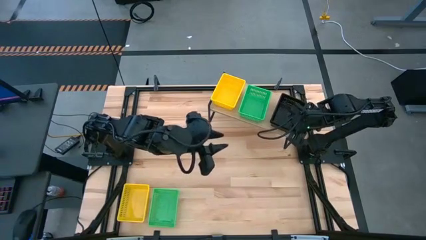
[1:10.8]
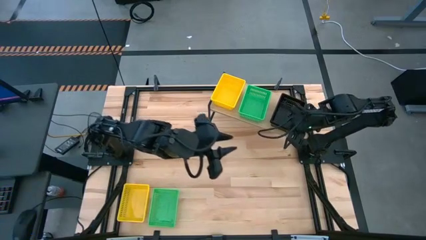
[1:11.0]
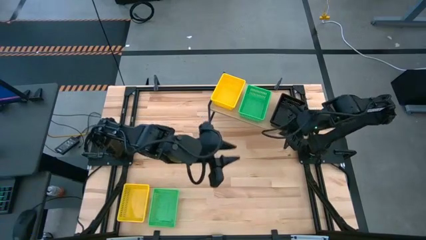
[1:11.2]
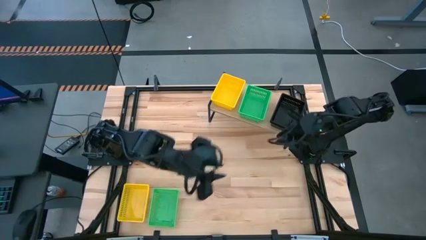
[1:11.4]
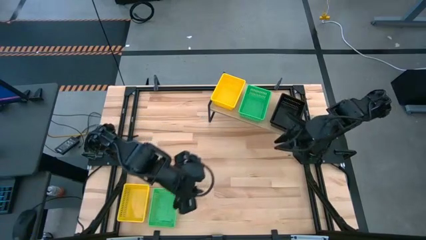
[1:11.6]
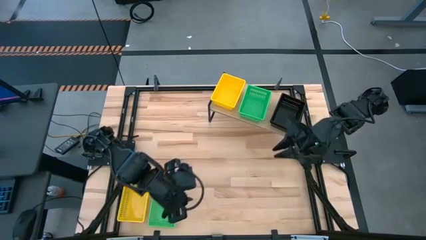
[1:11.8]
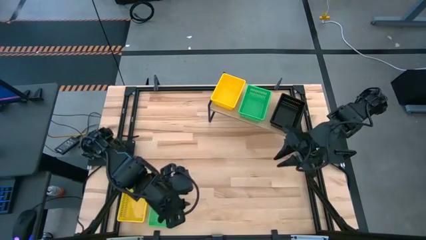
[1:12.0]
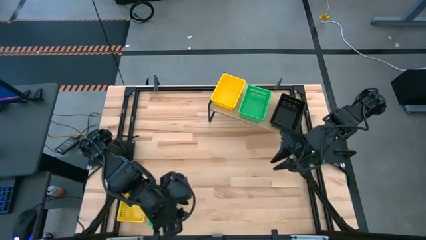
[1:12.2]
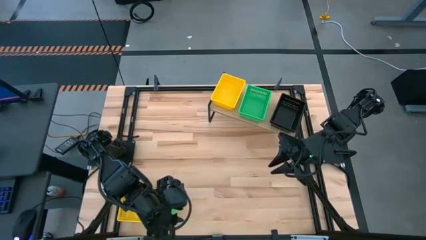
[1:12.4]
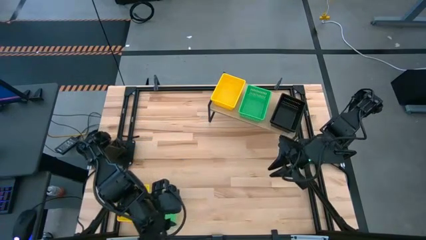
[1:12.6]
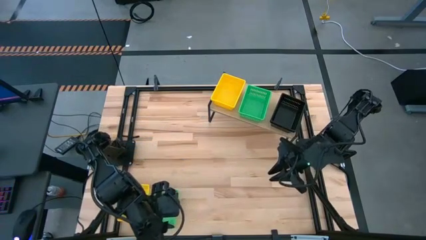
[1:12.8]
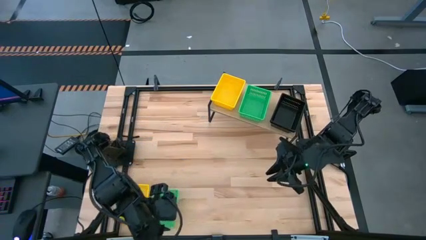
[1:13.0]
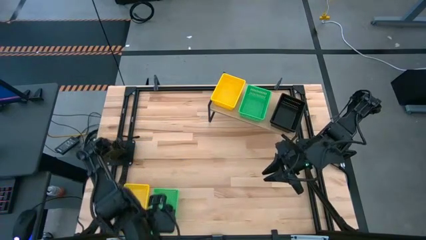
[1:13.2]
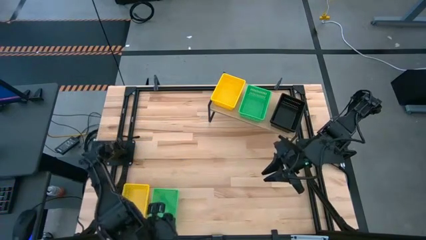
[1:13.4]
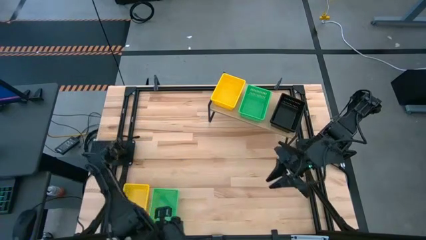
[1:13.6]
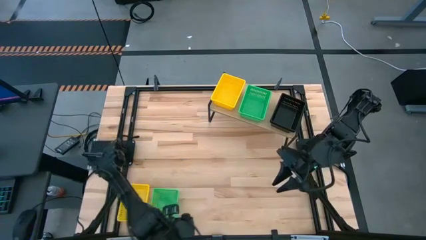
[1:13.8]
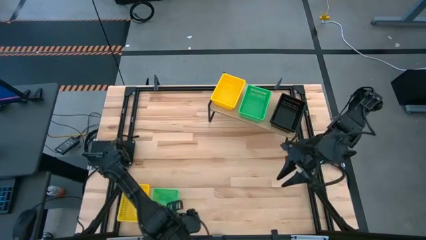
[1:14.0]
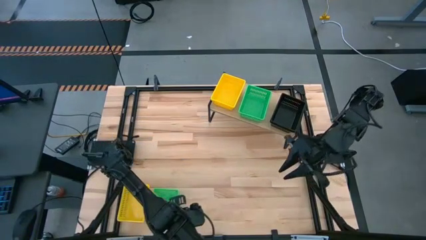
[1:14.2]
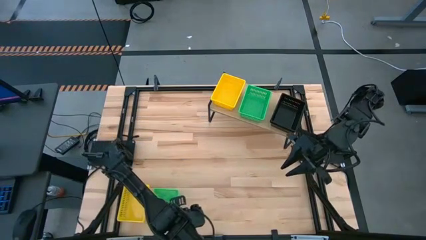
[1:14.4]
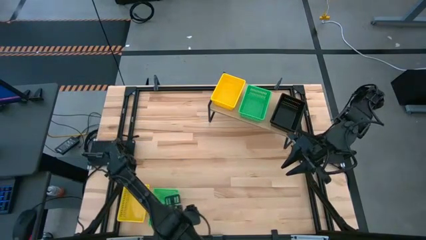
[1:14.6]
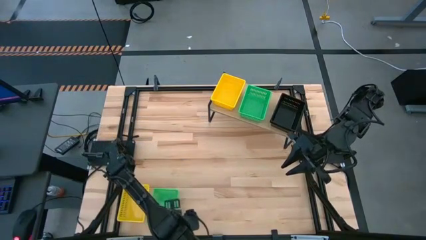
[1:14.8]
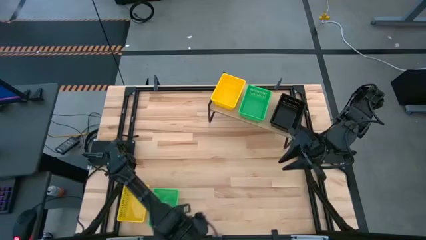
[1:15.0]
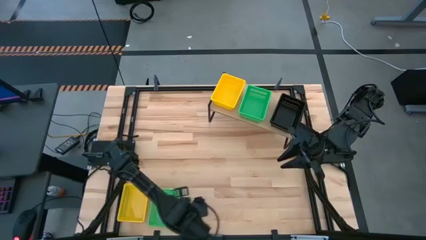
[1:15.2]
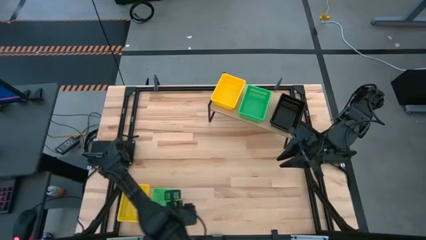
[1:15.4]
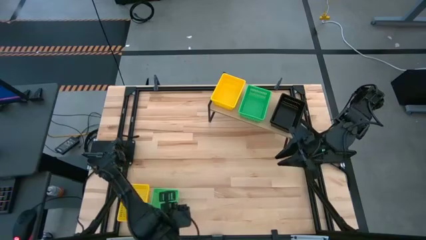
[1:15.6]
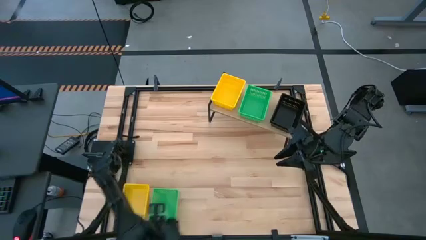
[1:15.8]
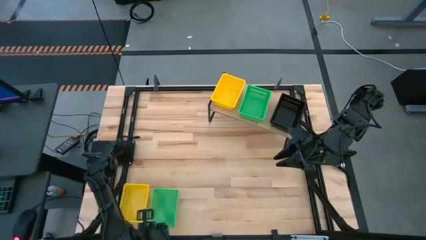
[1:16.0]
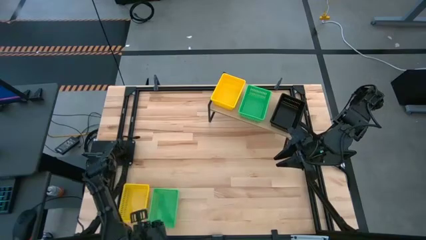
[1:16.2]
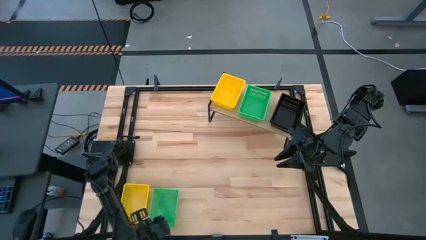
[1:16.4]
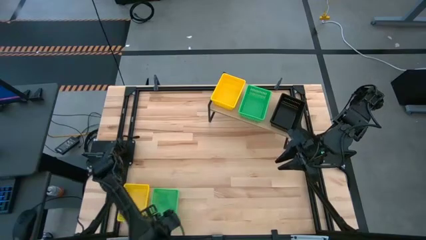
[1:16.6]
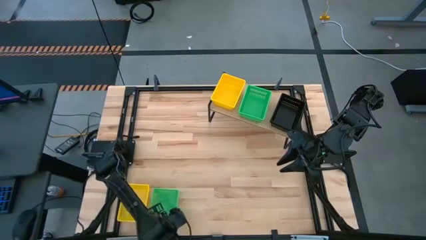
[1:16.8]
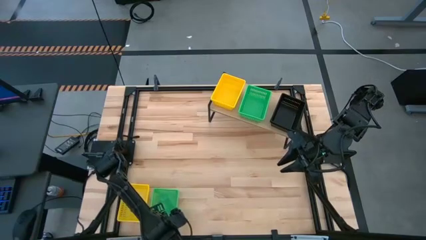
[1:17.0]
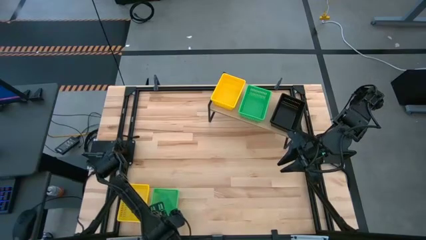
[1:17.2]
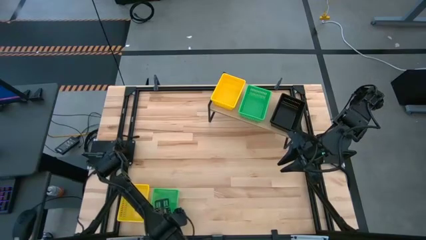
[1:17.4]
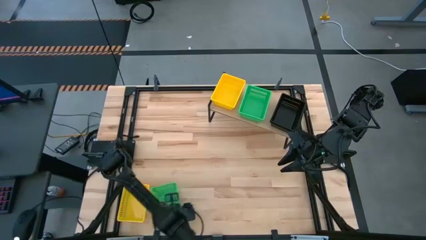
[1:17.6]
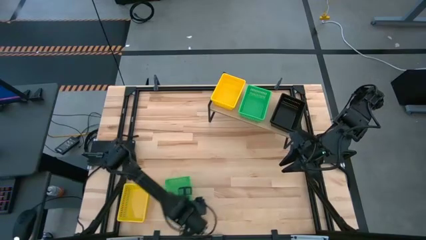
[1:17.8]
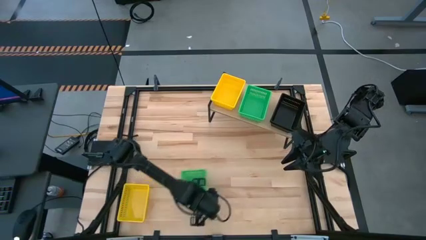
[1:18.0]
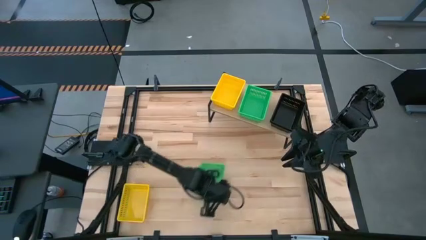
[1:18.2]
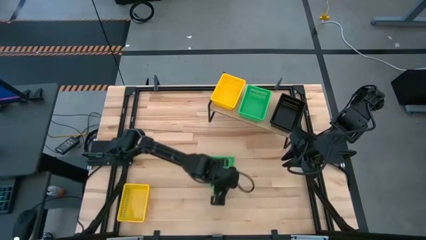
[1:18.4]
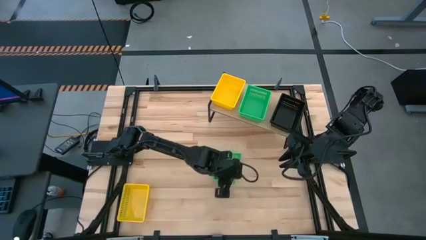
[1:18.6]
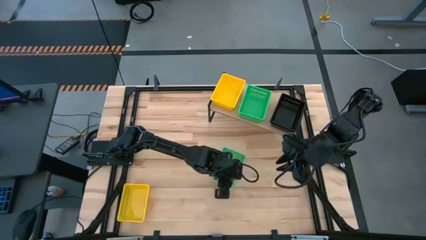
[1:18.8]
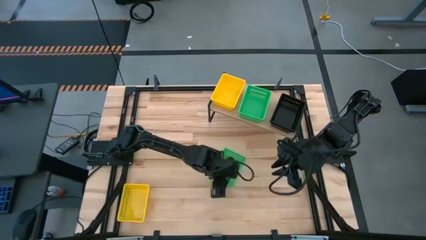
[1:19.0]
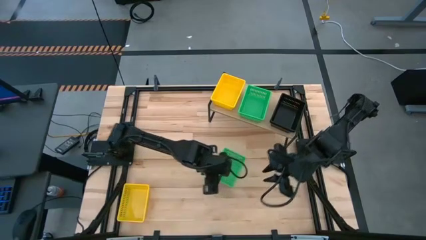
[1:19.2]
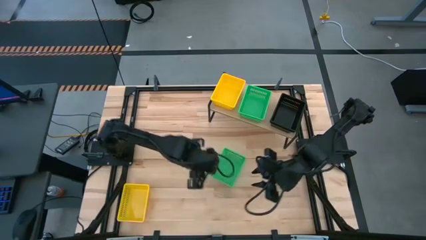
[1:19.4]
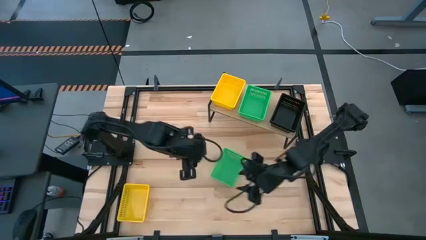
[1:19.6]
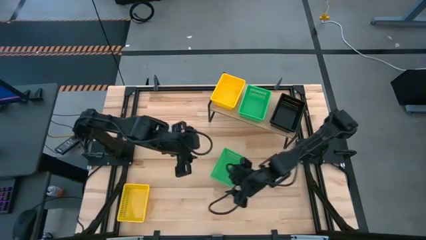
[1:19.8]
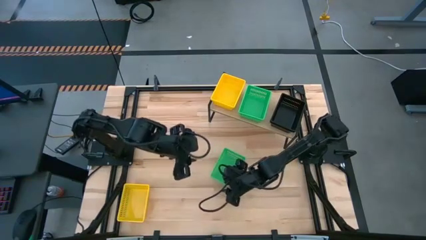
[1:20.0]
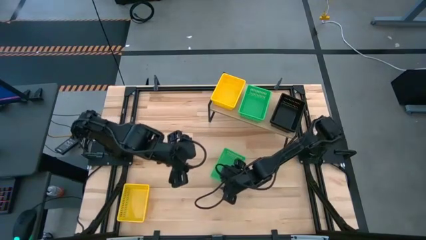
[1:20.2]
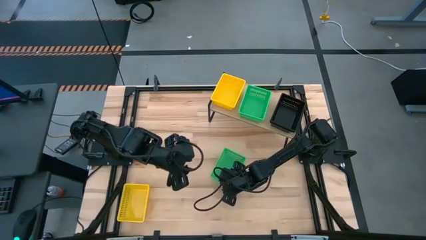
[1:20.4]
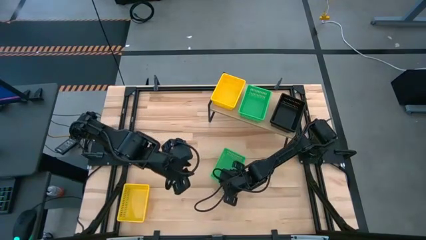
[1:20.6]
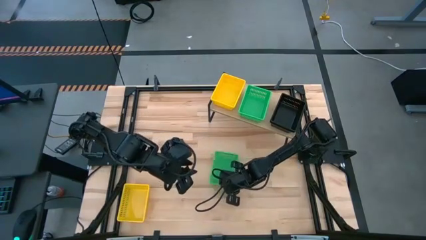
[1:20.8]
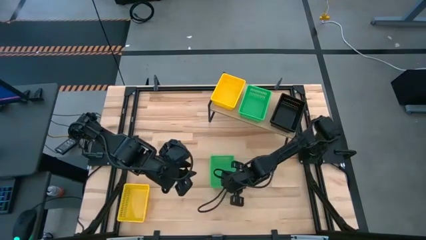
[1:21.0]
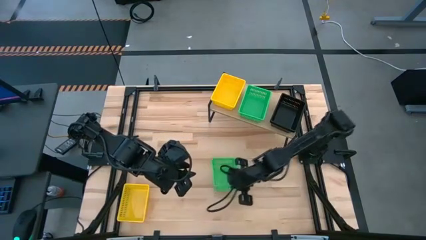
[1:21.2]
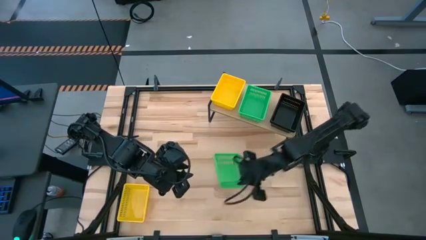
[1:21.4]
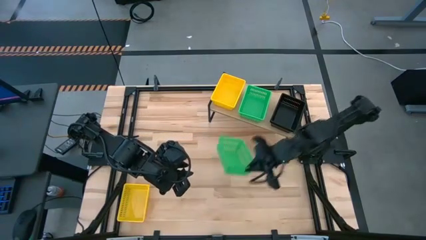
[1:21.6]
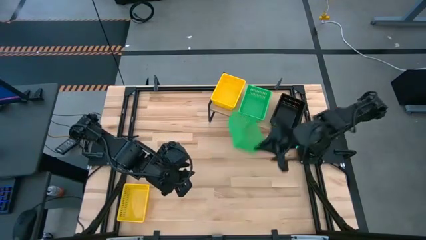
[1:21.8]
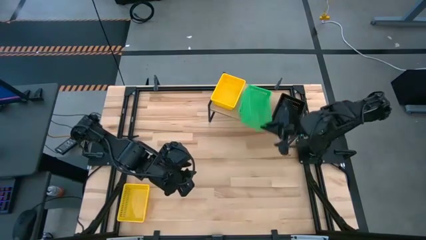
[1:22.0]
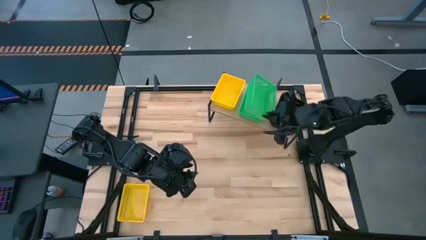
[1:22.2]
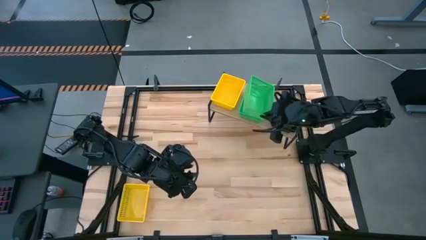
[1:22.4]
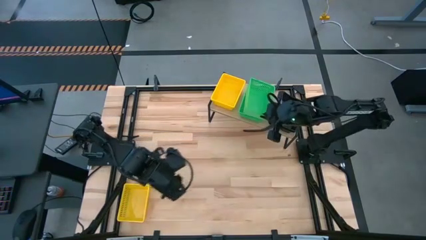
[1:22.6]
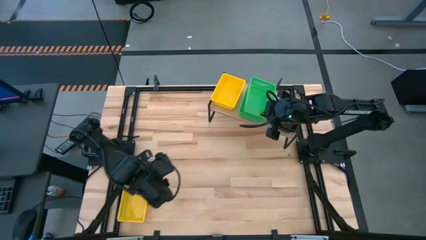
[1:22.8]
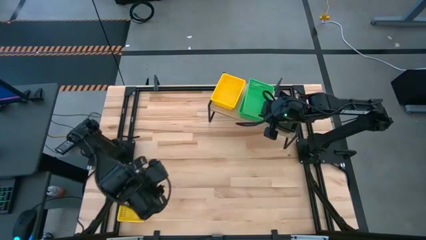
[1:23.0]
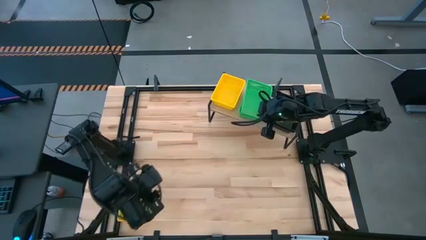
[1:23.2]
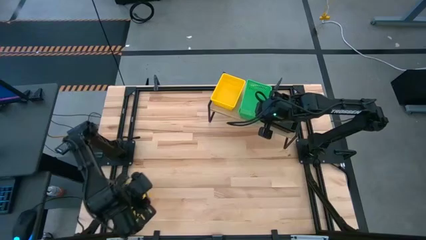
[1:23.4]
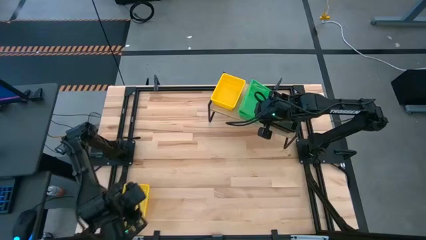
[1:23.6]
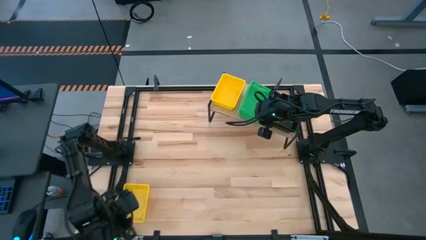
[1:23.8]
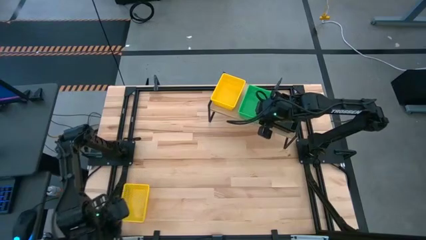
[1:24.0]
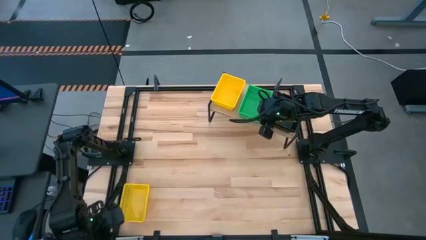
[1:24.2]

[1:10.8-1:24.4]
Task: Stack baskets on shelf by color
Stack the green bin on the green bin

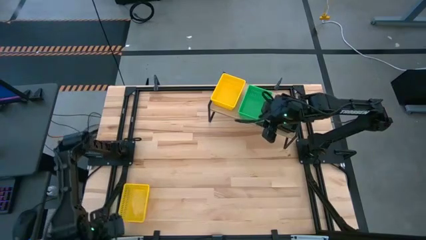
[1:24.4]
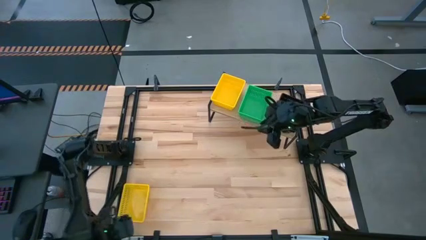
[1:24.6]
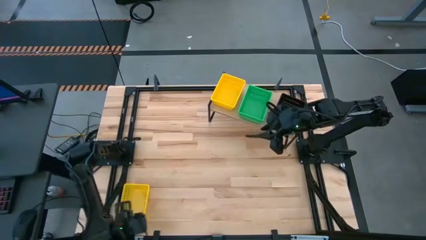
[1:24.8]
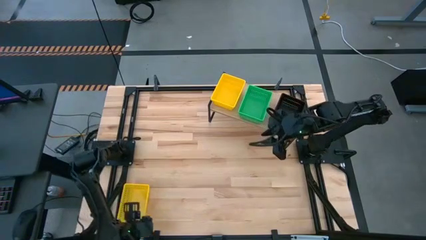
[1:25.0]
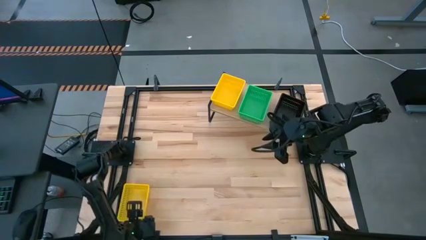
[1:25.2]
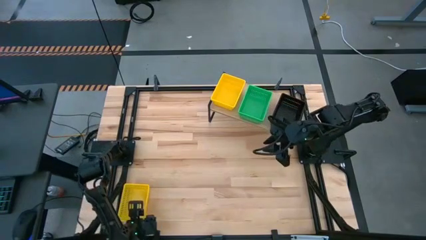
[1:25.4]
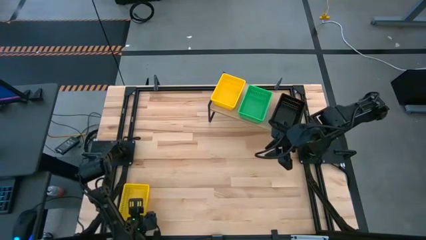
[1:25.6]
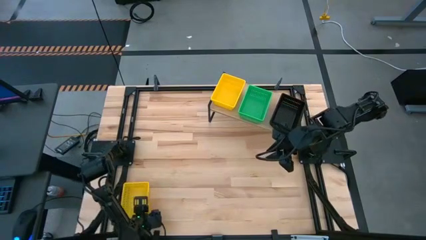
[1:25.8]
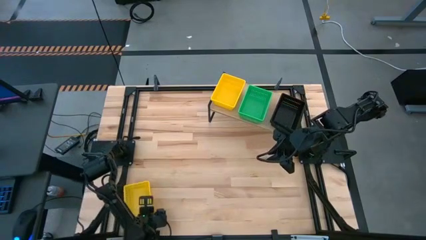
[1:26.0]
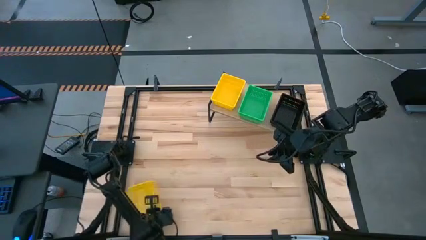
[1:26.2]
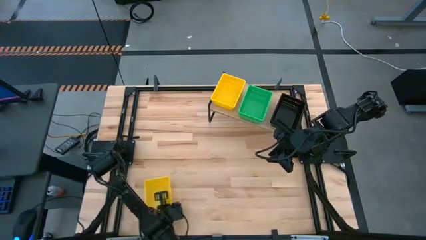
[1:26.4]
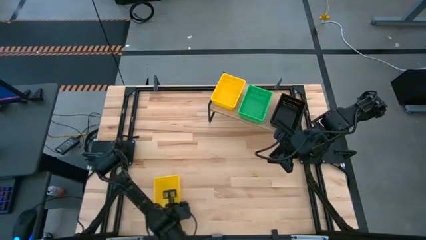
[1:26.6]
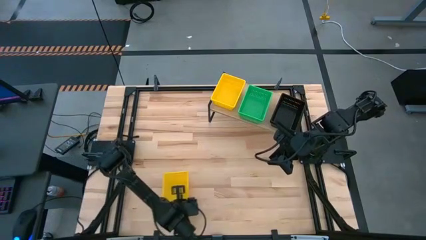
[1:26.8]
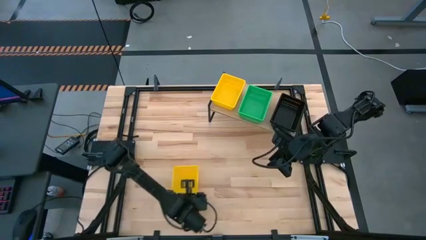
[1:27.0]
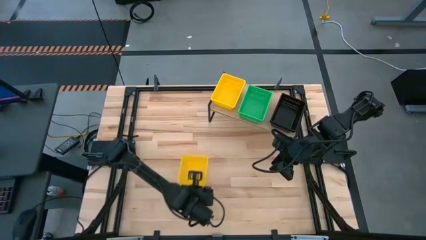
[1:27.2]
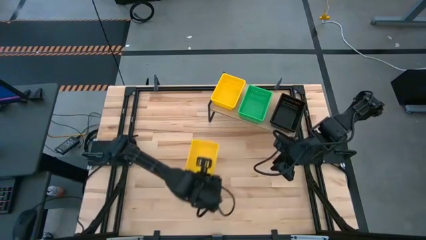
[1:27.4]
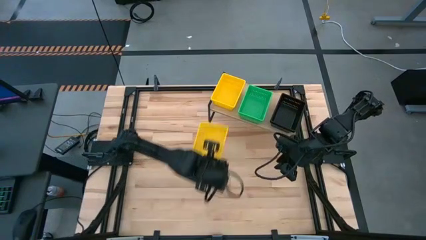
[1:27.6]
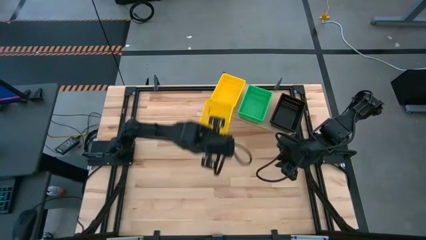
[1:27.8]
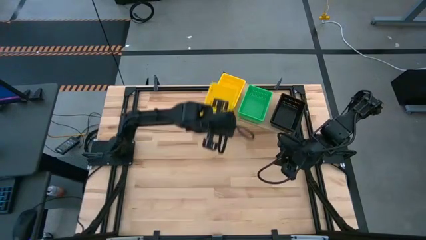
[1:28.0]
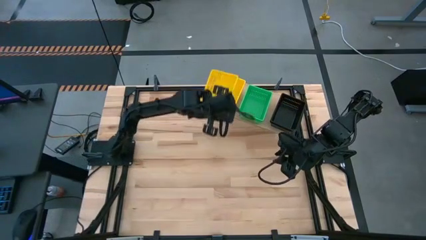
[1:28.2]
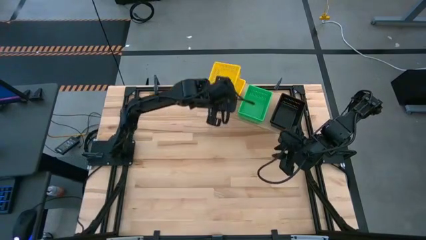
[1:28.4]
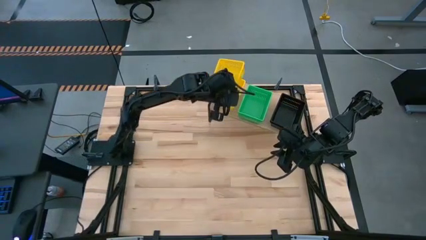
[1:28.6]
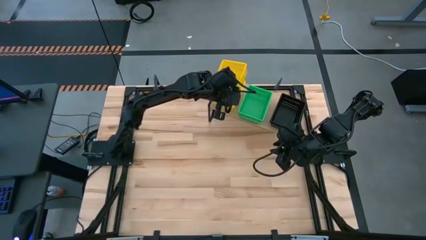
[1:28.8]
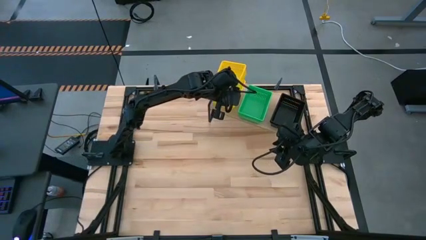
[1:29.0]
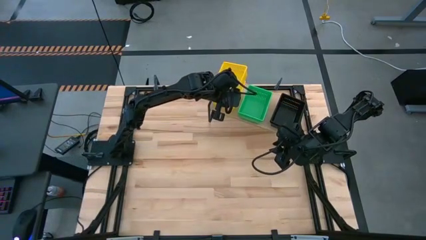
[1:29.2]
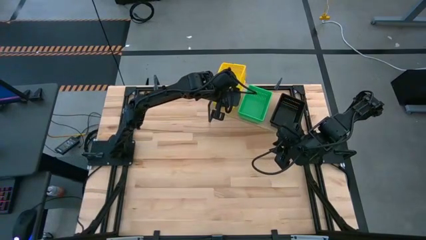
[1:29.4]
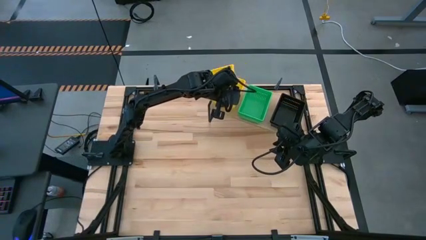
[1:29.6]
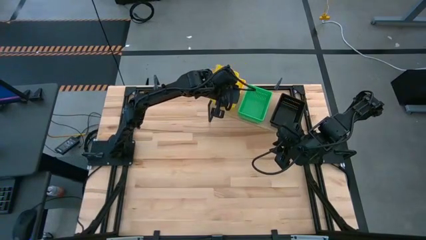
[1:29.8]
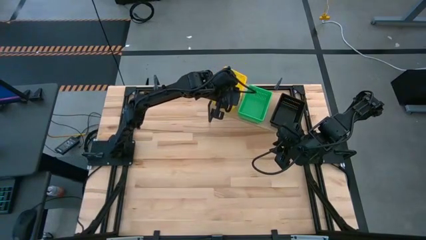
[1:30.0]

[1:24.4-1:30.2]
Stack the yellow bin on the yellow bin
